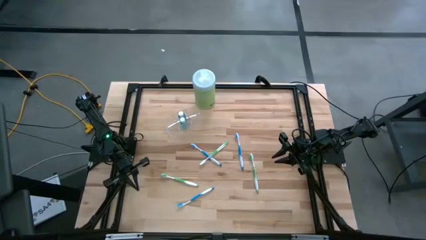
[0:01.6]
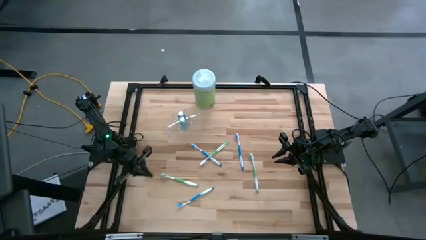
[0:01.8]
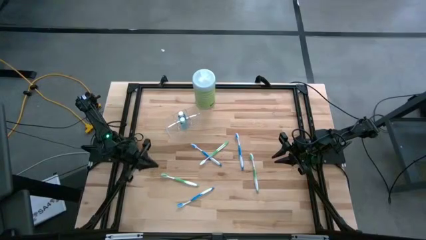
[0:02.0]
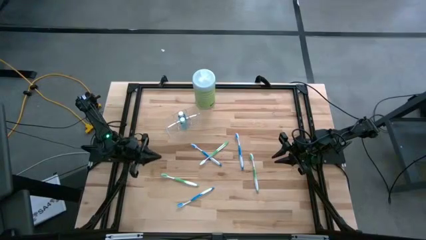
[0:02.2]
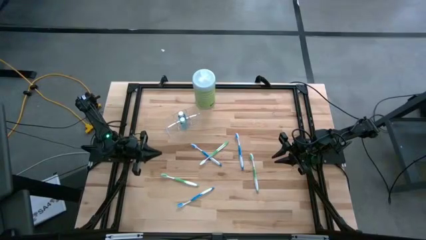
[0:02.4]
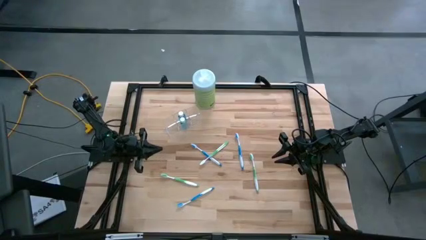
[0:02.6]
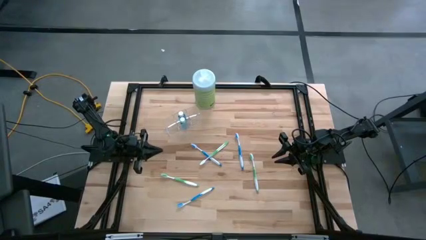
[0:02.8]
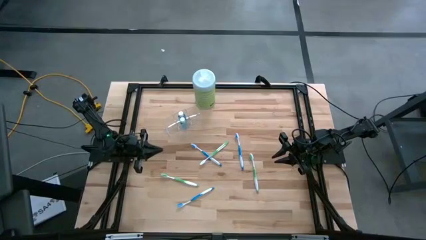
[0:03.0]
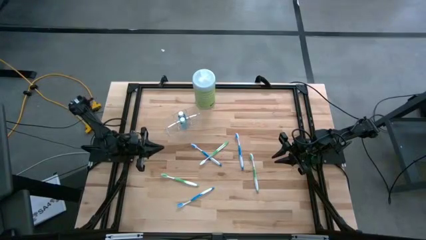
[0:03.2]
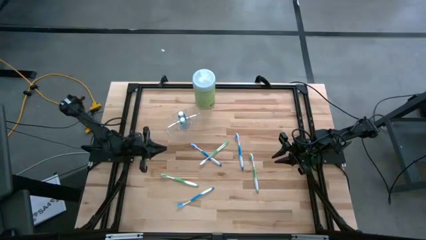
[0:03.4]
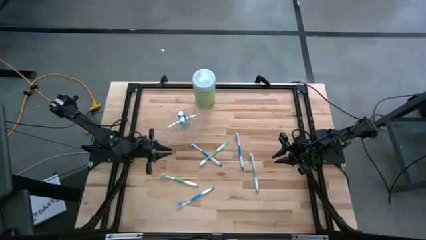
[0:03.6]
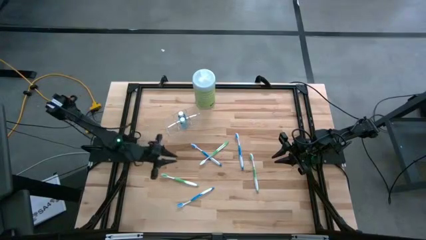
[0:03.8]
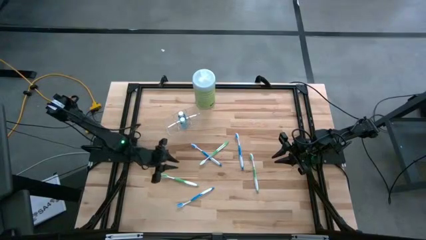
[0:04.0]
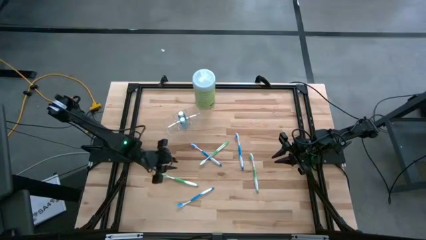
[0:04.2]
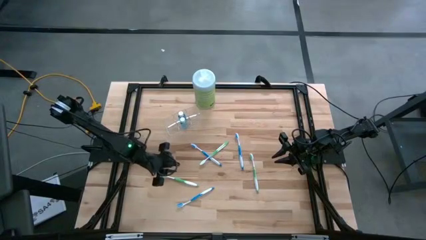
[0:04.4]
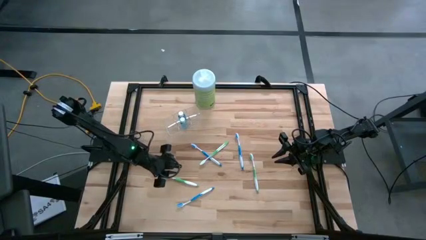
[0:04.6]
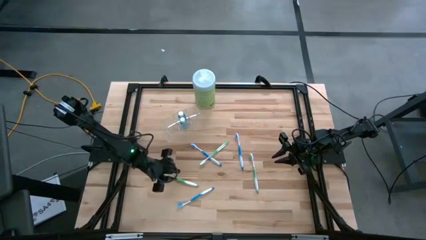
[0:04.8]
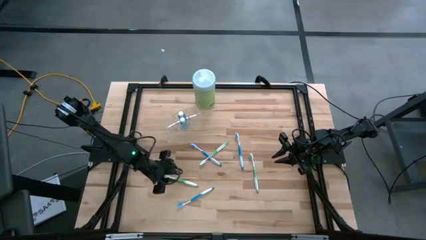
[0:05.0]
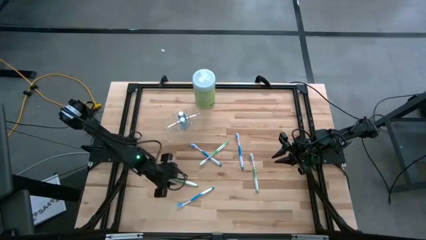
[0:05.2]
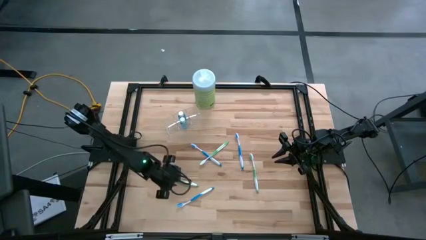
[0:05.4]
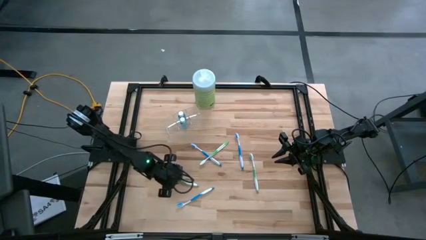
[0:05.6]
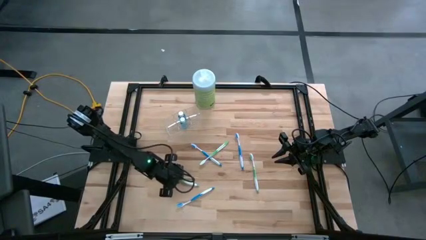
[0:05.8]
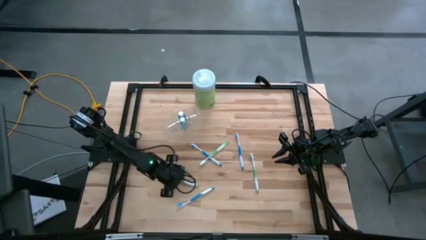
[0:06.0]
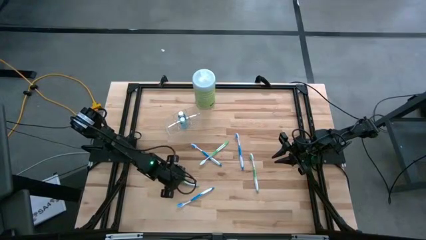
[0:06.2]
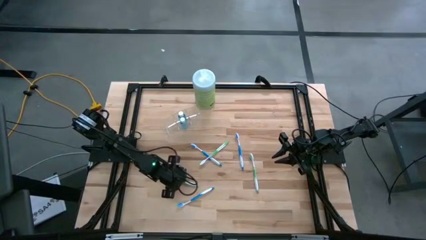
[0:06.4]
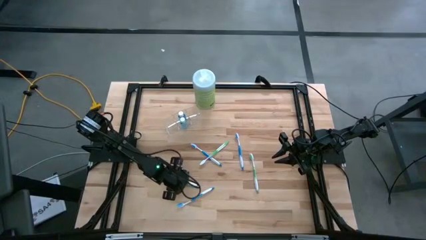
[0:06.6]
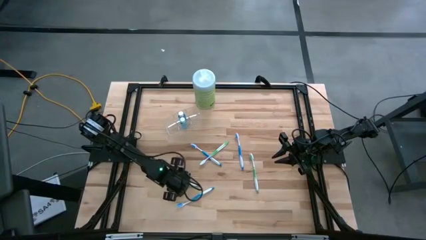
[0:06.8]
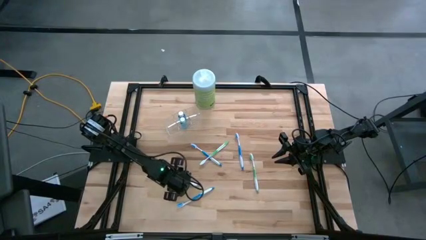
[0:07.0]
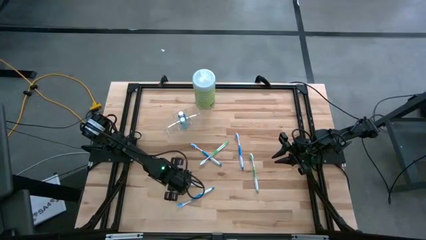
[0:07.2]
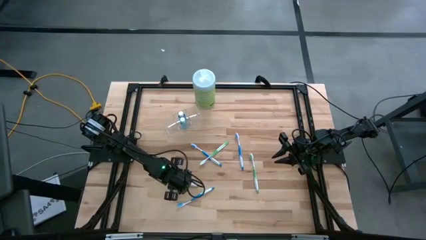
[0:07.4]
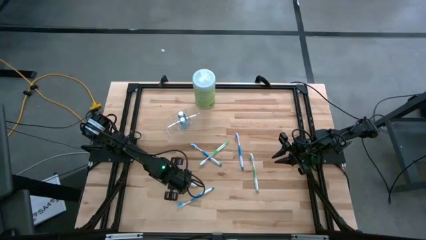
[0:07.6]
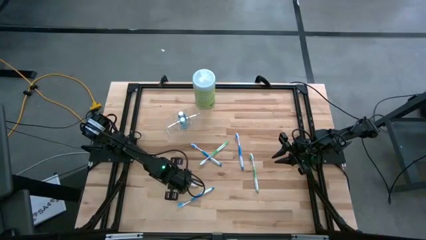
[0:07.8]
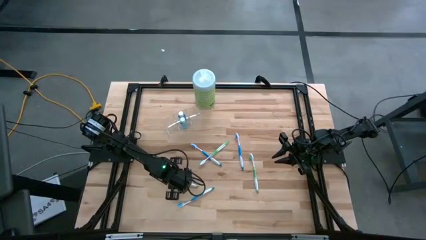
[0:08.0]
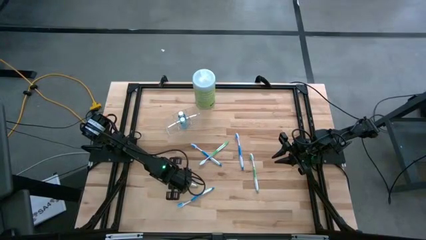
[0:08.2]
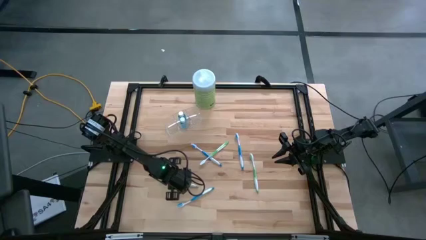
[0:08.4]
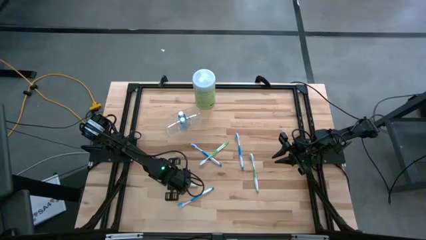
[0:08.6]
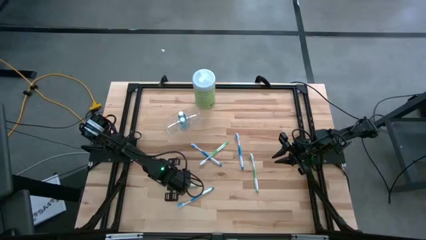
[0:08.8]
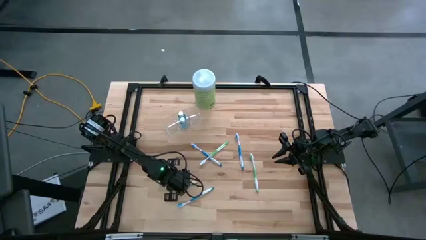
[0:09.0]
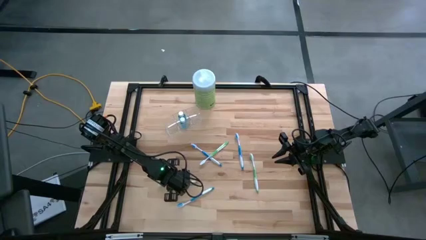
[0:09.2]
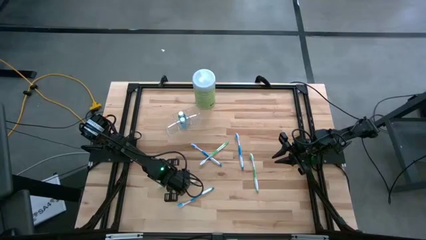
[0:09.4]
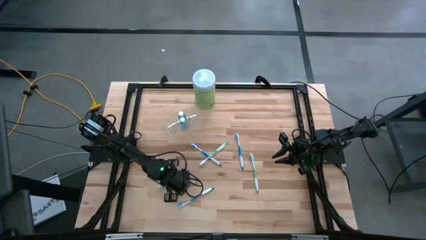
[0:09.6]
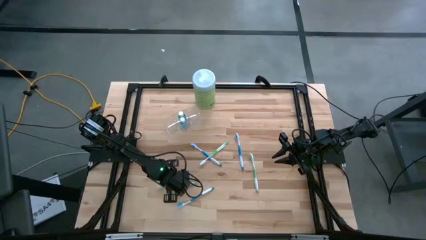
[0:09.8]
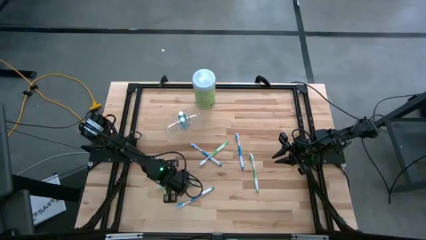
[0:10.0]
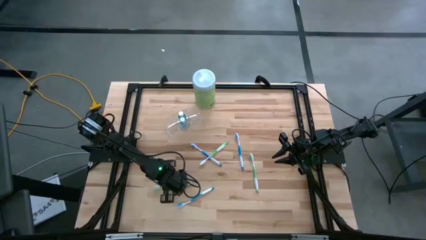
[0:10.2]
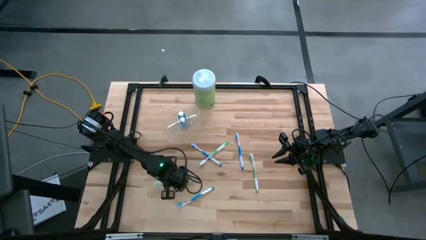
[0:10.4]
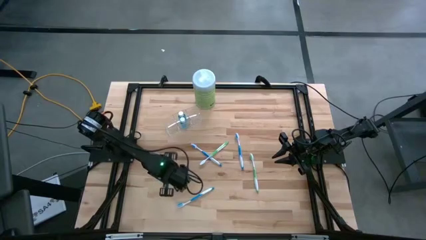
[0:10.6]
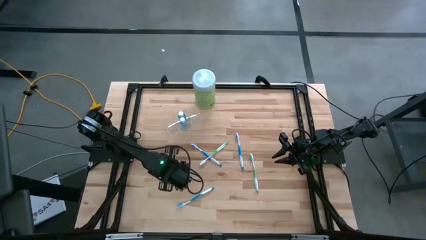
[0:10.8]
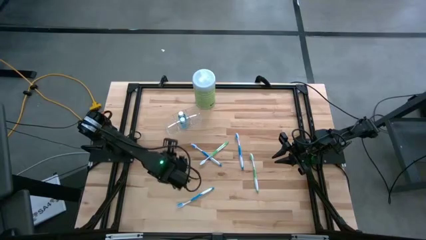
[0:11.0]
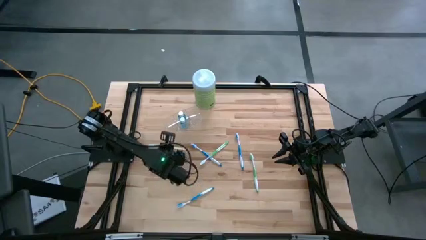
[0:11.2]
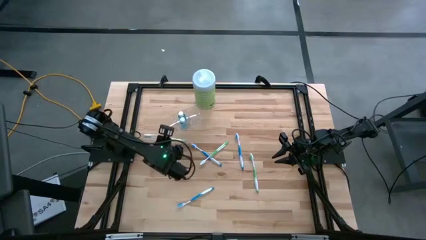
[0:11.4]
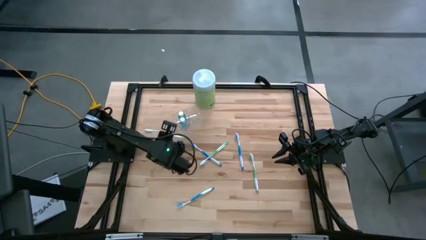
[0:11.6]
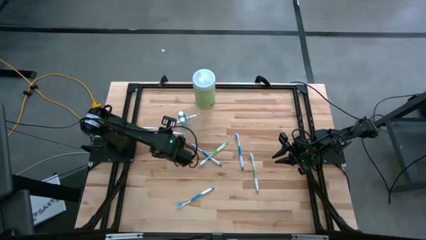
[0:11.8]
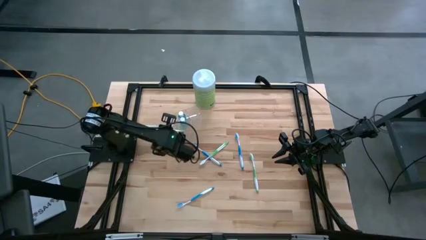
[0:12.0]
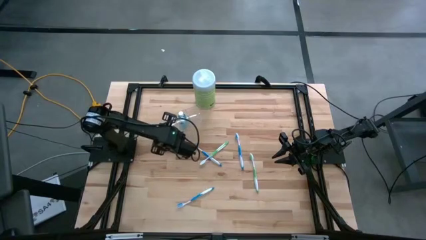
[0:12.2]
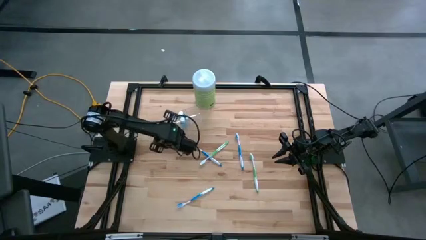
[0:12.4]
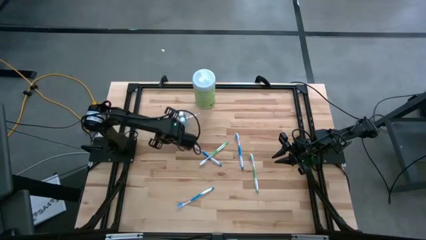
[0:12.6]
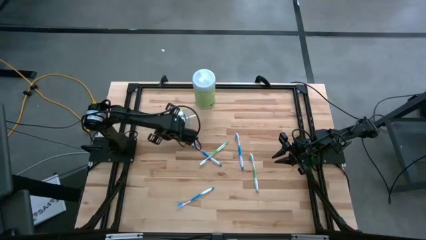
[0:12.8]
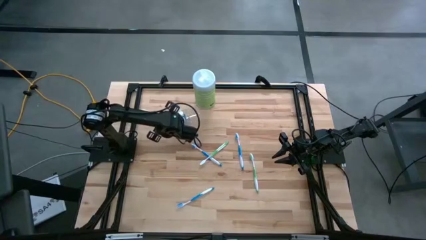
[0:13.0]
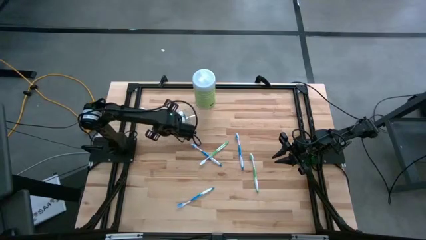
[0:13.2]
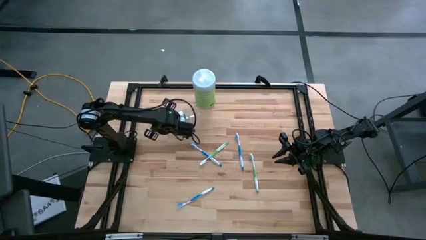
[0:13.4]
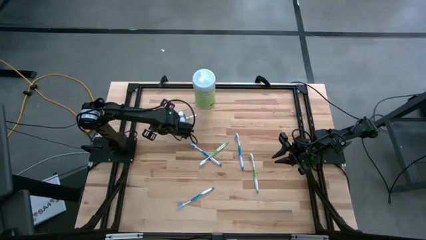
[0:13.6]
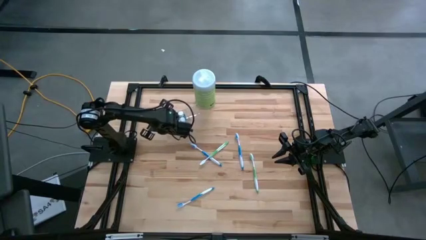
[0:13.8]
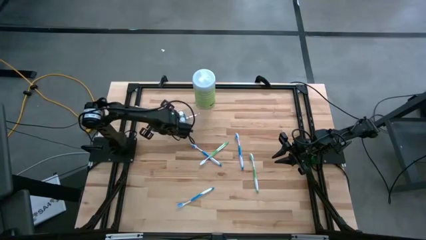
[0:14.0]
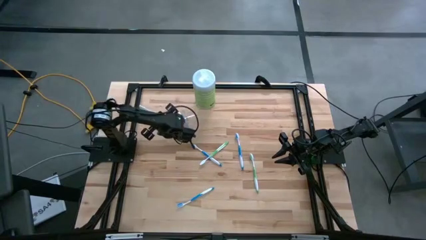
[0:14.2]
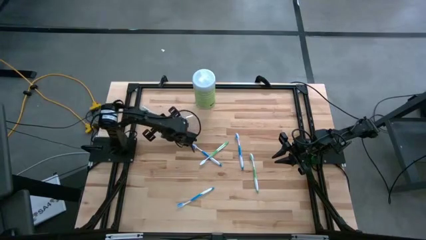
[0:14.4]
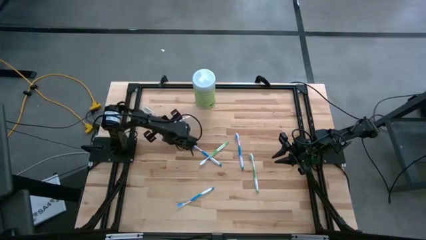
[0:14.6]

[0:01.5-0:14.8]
Task: Pick & Place toothbrushing station
Put the green toothbrush into the transparent organizer
